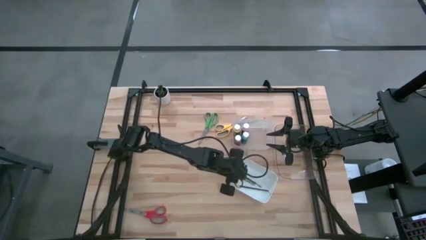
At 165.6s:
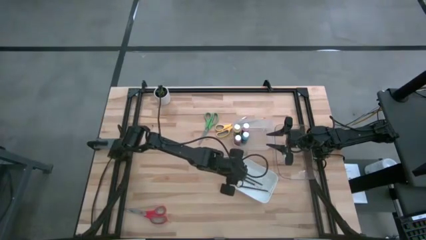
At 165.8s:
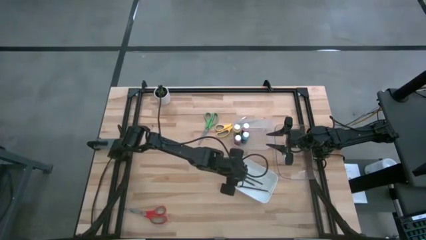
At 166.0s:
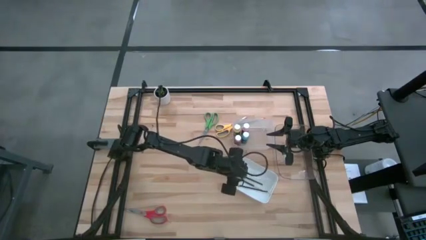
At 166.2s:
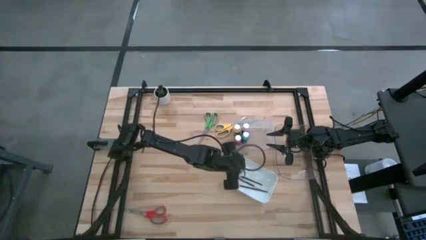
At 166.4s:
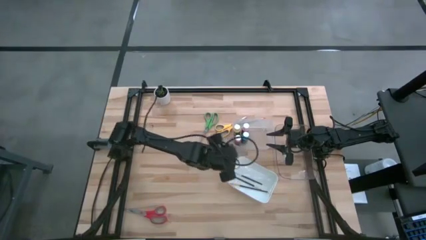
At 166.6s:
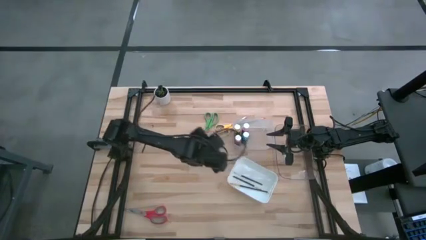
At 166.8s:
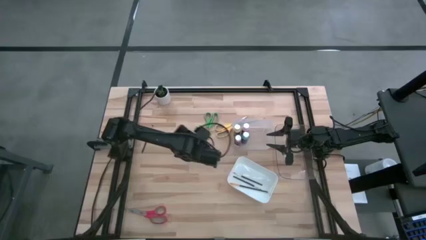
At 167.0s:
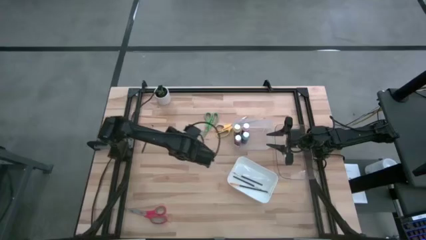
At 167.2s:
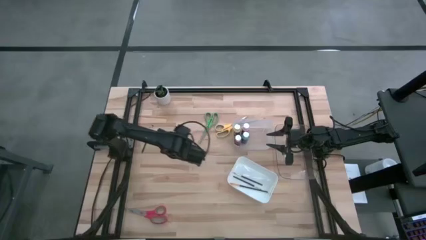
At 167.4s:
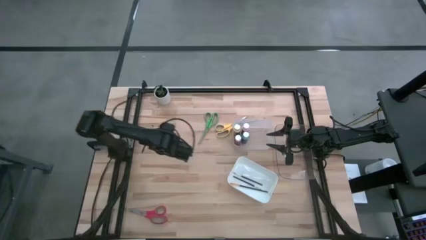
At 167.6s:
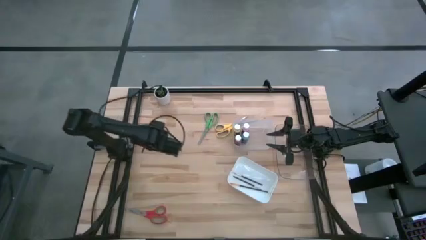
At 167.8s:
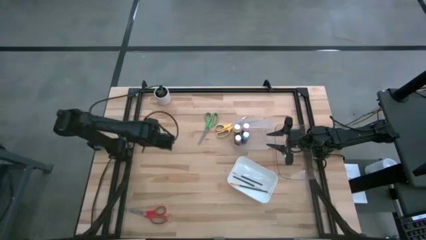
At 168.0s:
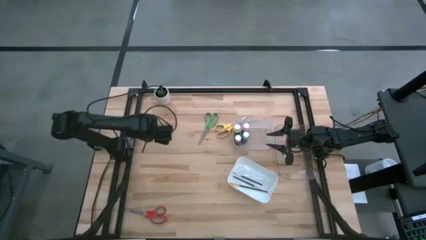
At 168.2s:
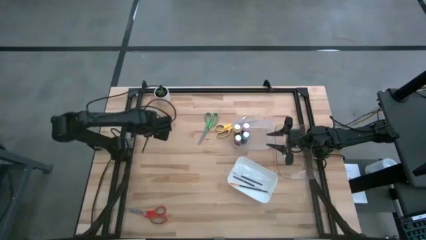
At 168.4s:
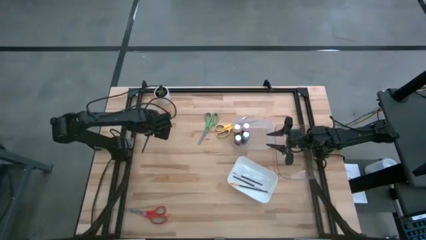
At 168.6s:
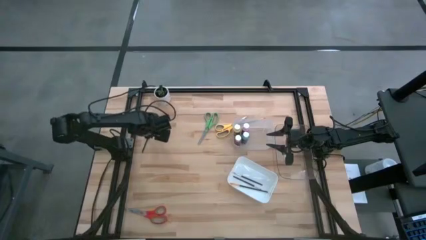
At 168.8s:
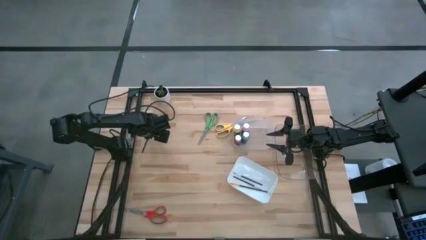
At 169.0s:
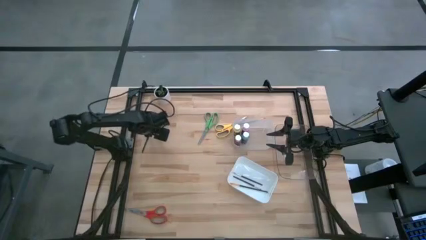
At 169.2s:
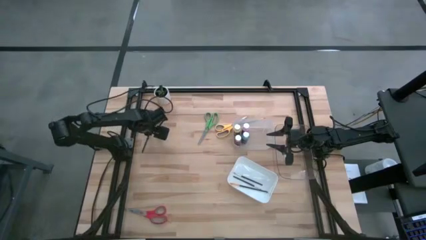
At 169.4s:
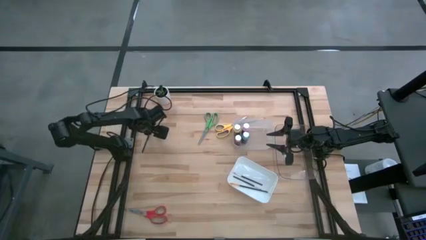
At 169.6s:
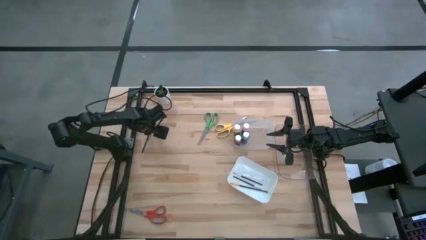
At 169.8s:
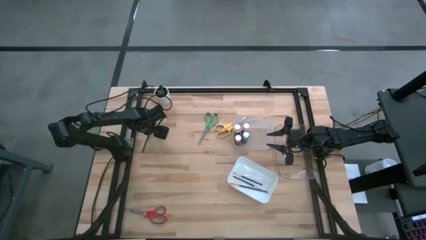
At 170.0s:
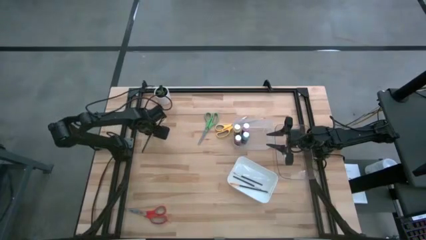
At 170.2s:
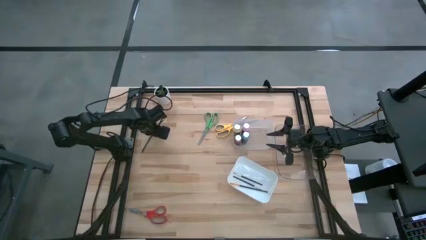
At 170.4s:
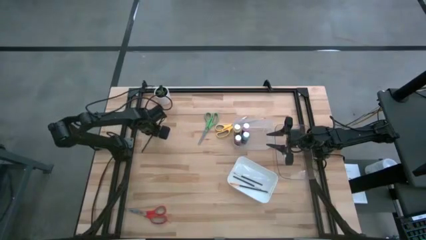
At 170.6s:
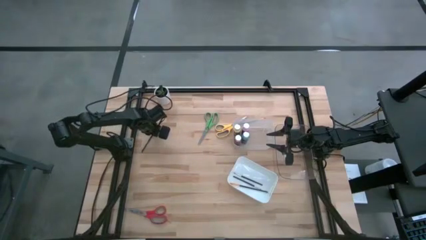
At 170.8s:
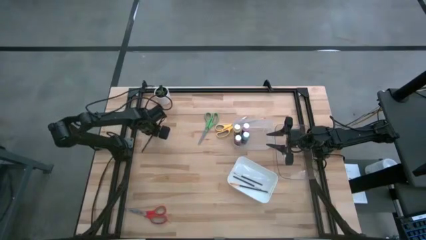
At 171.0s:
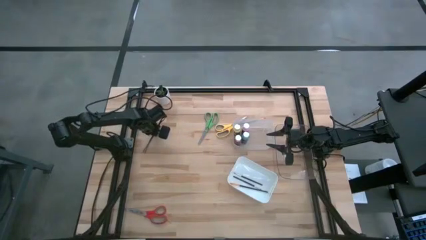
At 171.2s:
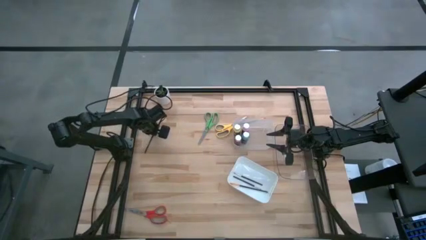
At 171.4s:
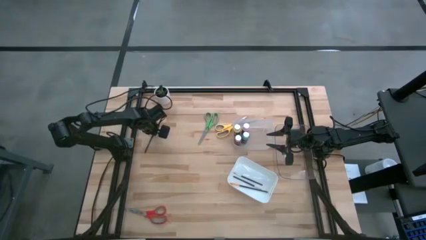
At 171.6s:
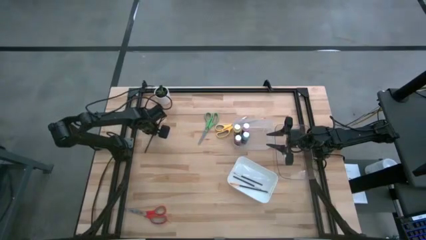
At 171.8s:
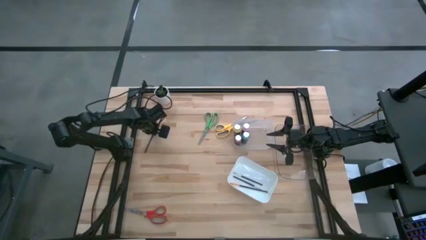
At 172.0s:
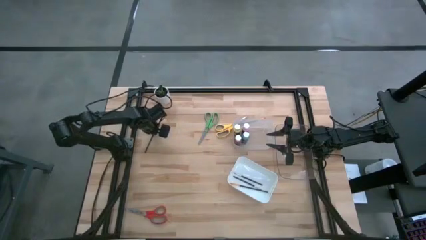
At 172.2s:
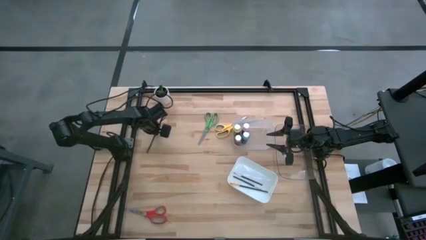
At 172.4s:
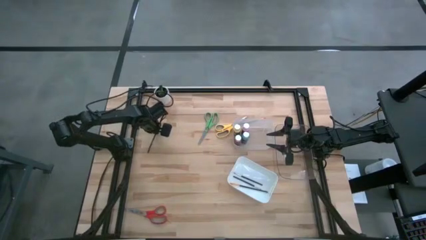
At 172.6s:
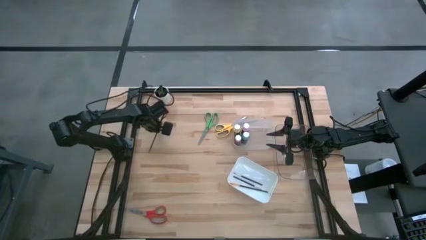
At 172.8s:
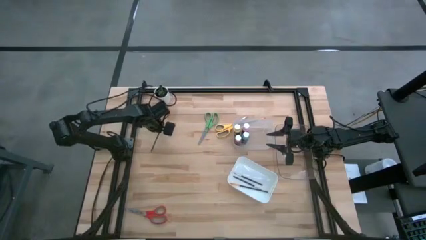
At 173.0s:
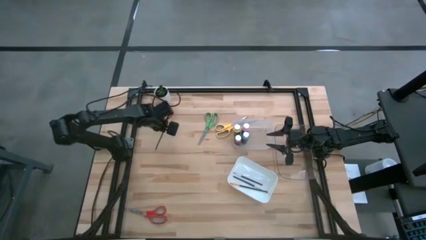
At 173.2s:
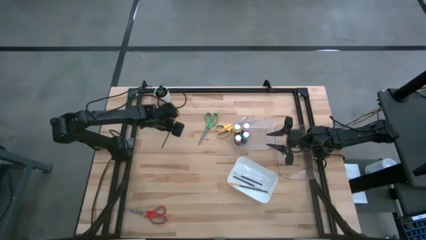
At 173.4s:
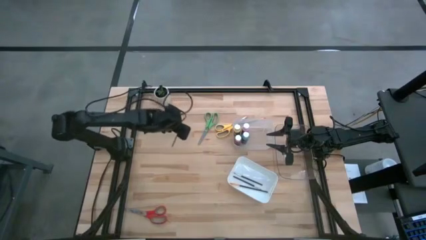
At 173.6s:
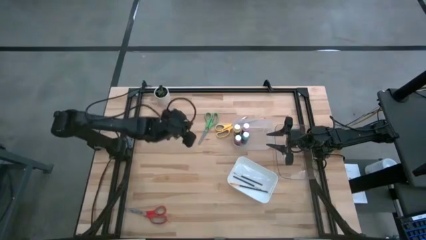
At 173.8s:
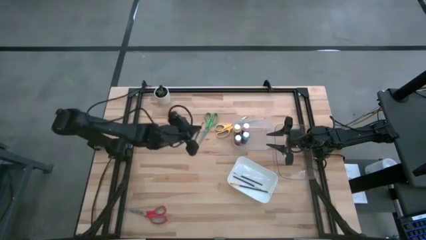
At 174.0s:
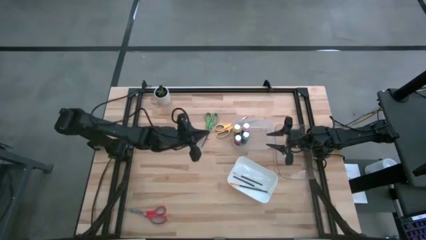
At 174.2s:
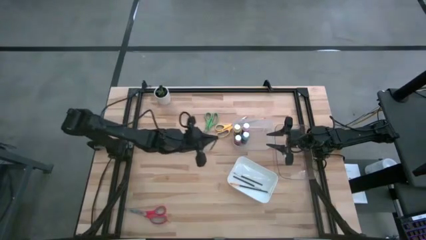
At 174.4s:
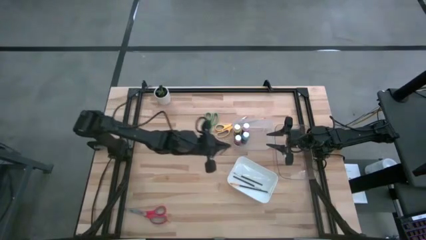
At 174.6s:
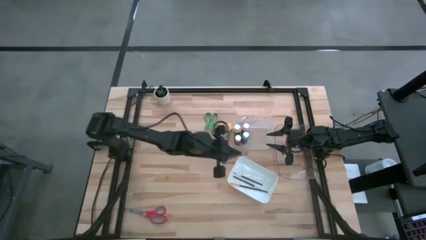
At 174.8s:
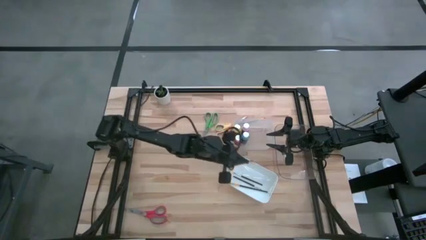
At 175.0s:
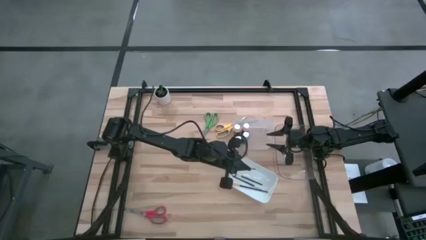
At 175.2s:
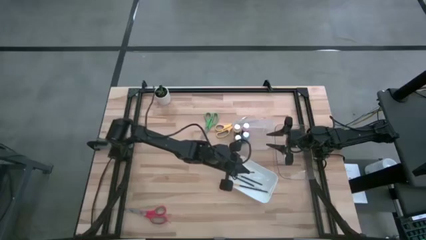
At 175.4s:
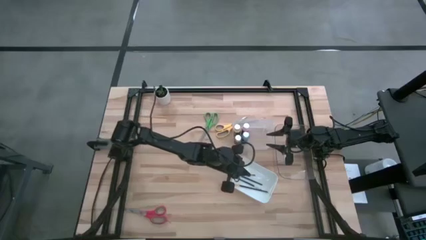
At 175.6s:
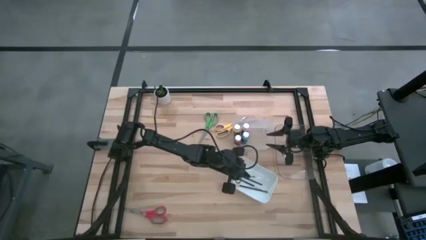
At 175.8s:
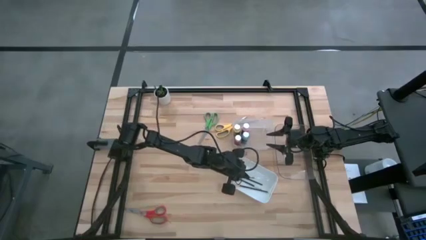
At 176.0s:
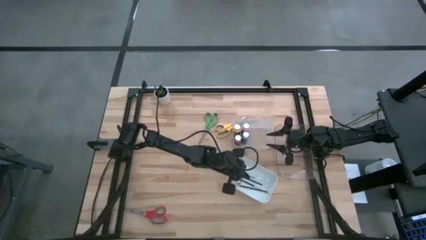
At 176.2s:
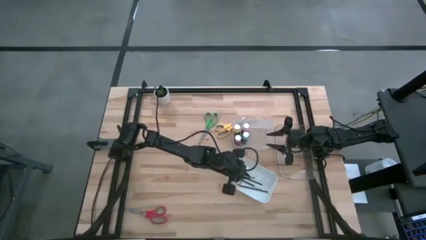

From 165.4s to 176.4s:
Task: Pick & Place Paint Supplies
Put the black paintbrush into the white bin

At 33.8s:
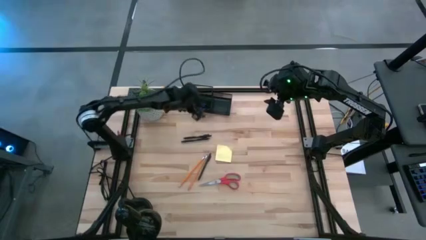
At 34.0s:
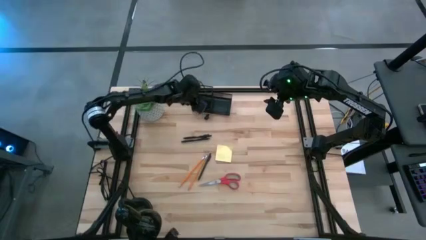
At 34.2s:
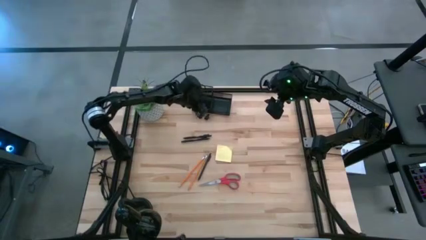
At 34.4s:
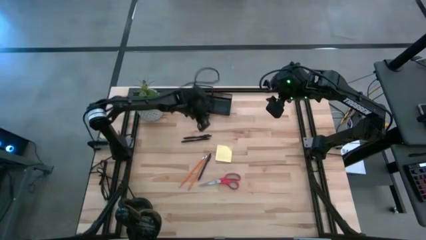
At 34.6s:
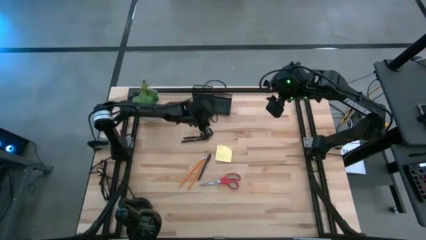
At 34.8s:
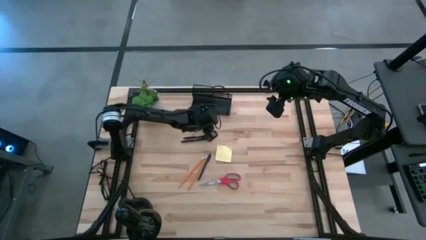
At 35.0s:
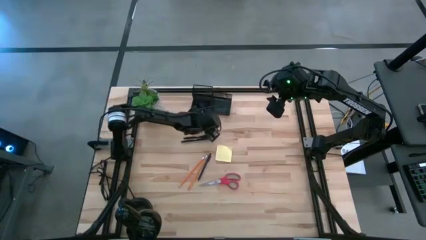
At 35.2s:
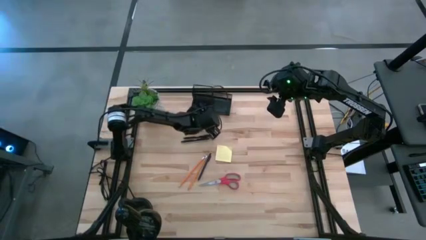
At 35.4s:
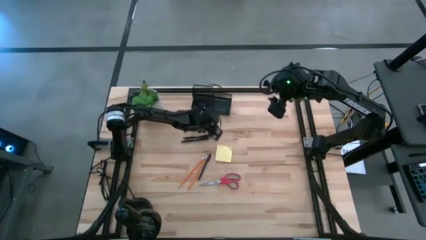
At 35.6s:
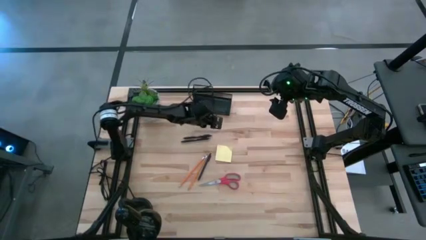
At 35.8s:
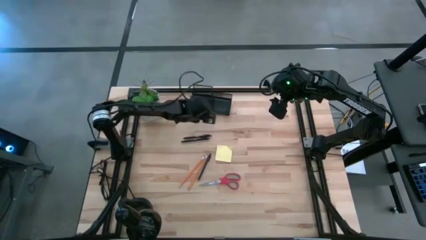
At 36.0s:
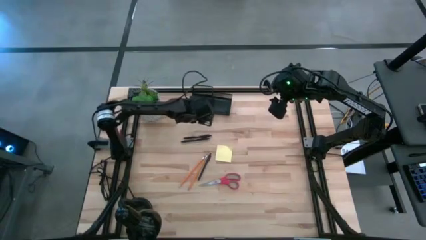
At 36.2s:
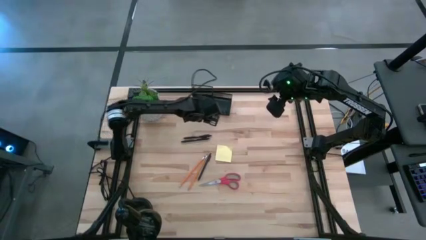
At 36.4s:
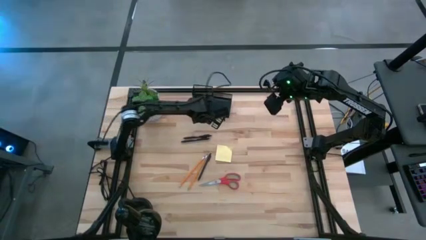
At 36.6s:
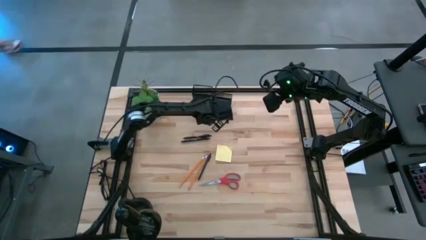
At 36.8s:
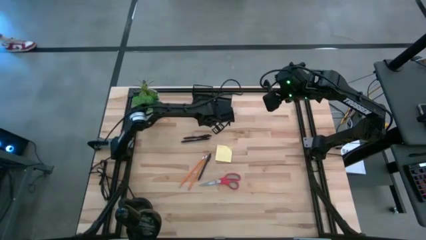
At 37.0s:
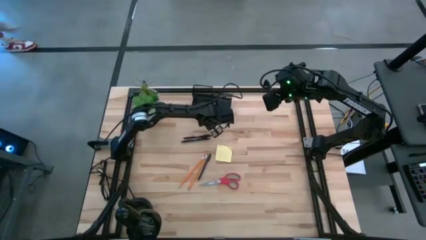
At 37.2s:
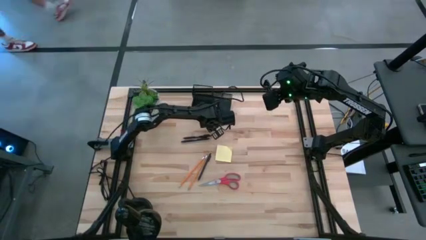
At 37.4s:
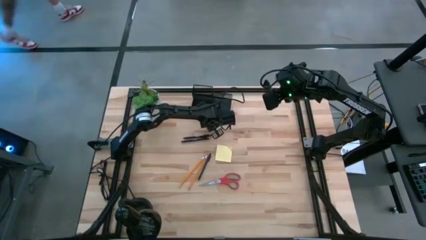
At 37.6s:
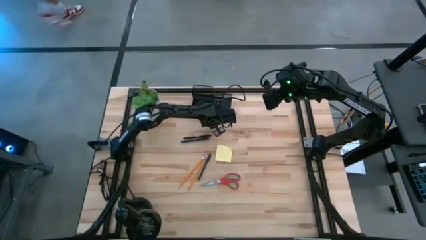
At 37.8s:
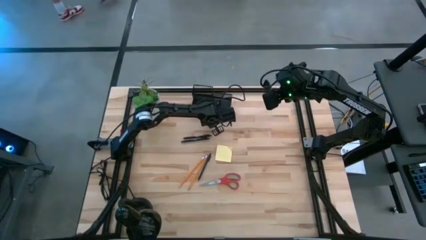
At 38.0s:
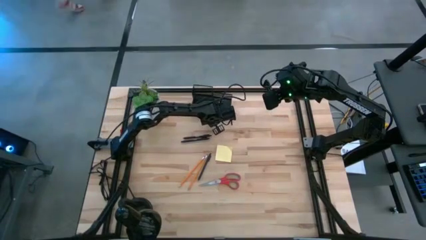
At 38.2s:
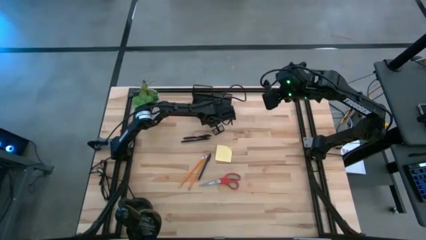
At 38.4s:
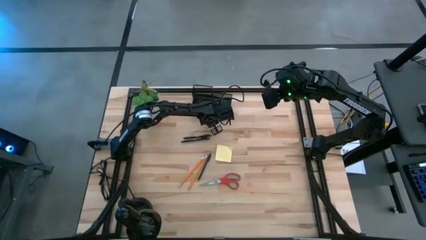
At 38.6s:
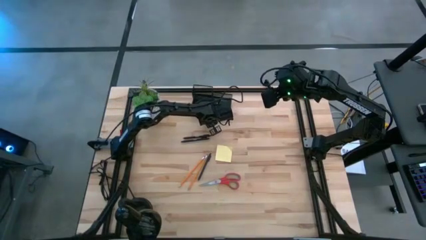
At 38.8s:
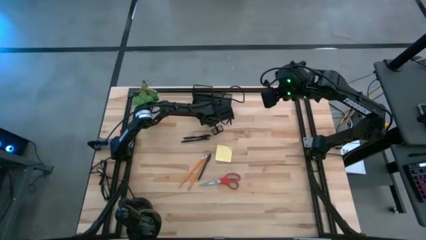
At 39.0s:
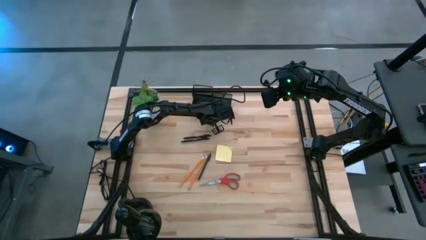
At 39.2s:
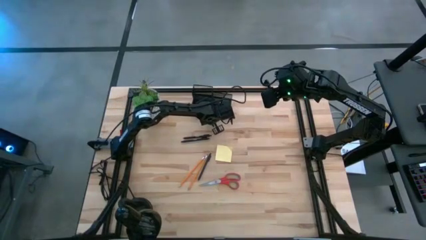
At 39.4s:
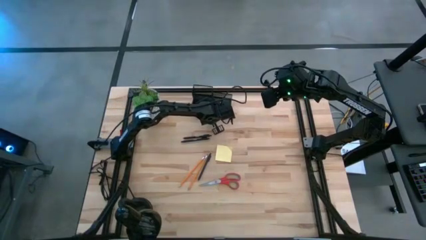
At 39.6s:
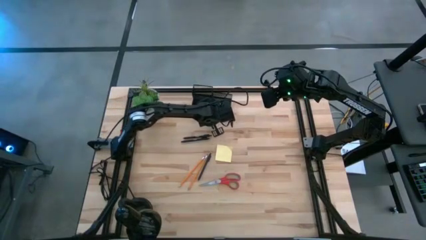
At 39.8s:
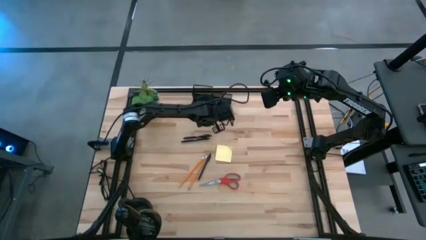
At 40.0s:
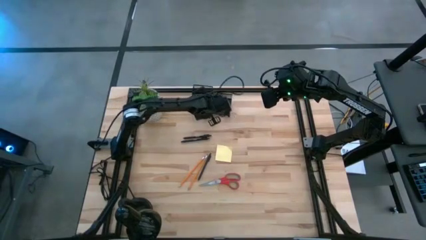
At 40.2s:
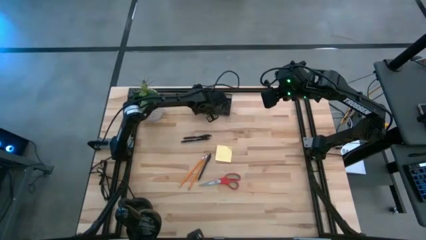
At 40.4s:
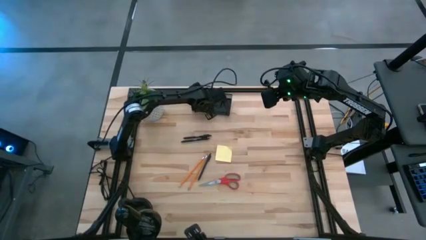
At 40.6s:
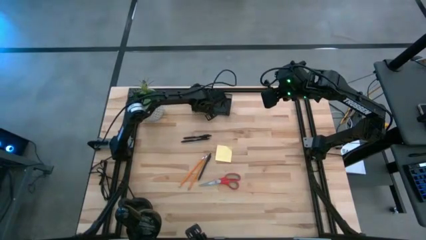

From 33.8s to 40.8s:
Task: Pick and place office supplies into organizer
Put the binder clip into the bottom left section of the black desk organizer
